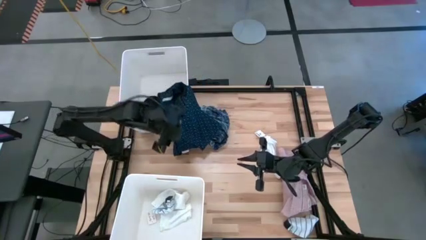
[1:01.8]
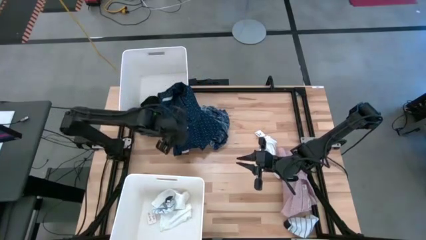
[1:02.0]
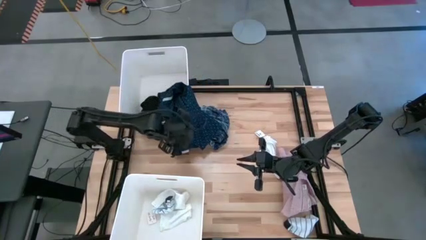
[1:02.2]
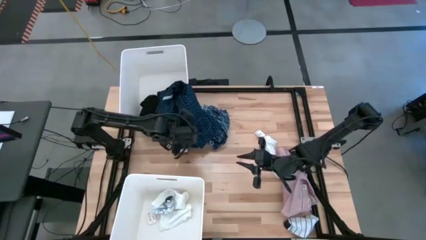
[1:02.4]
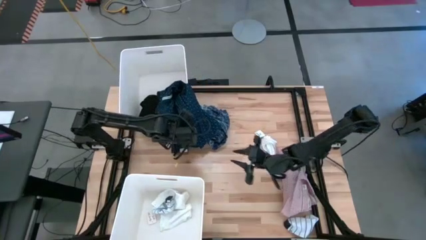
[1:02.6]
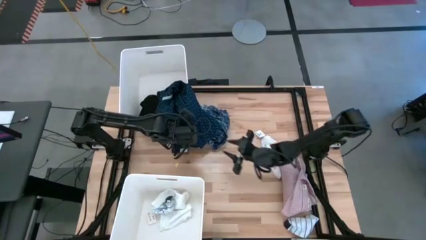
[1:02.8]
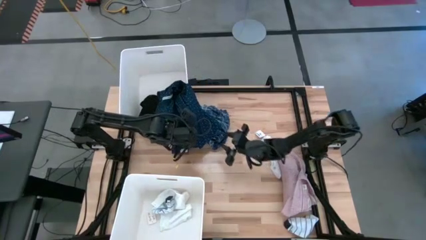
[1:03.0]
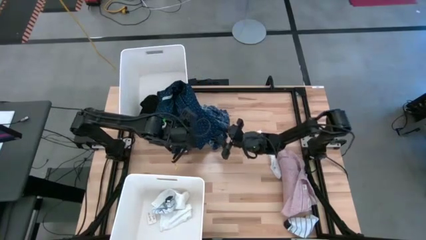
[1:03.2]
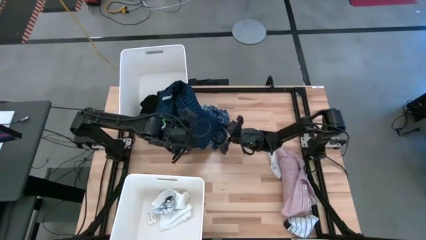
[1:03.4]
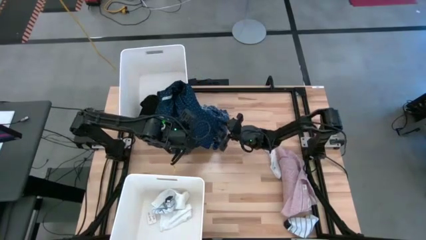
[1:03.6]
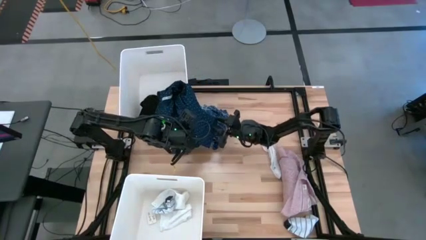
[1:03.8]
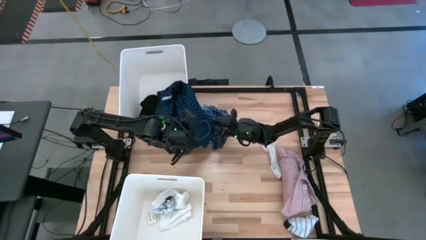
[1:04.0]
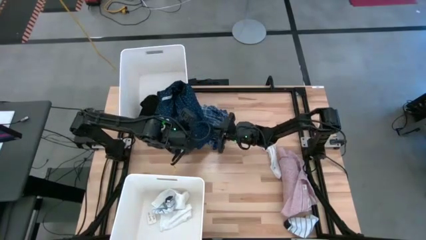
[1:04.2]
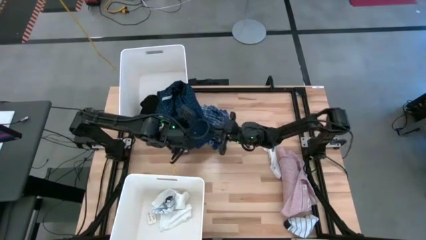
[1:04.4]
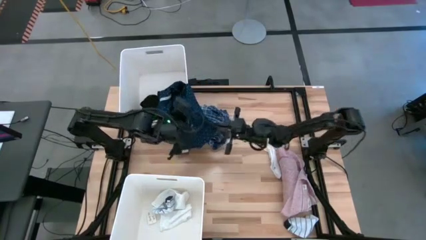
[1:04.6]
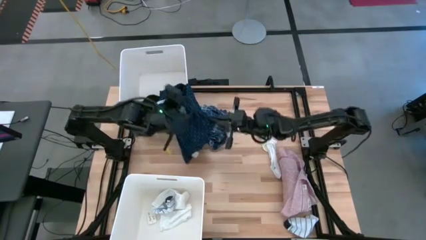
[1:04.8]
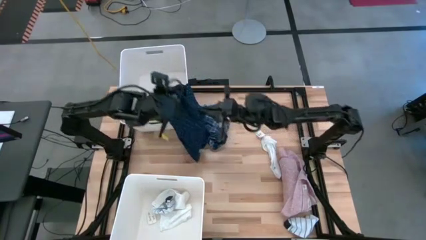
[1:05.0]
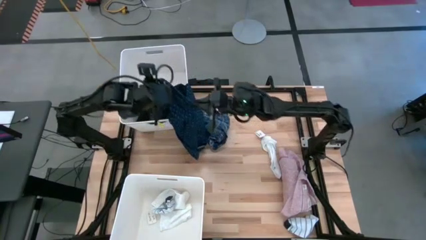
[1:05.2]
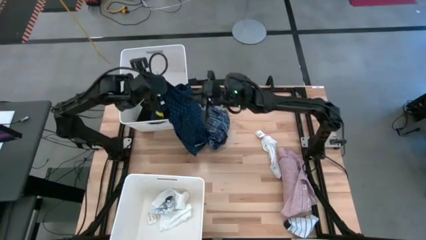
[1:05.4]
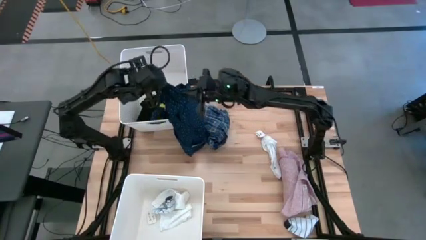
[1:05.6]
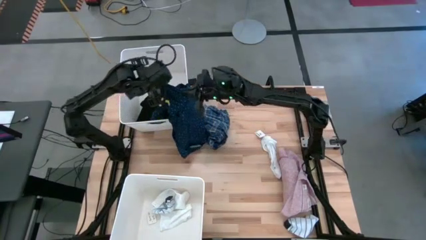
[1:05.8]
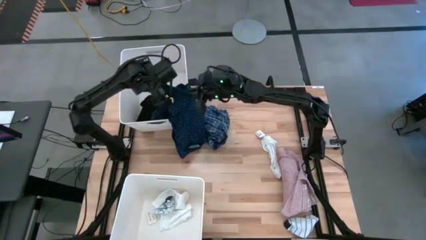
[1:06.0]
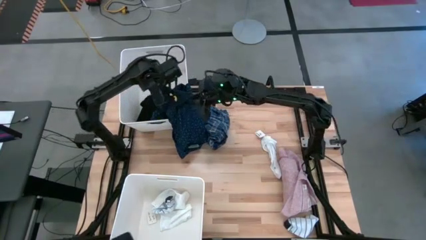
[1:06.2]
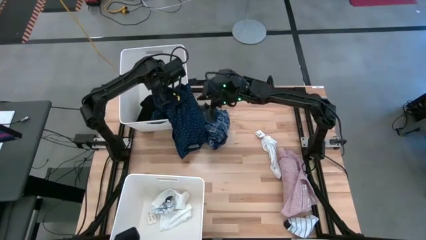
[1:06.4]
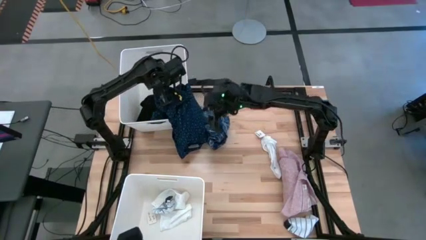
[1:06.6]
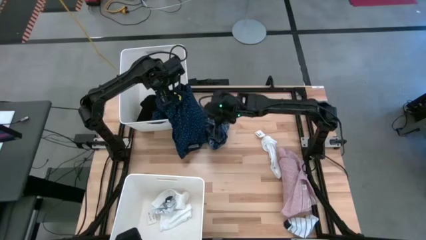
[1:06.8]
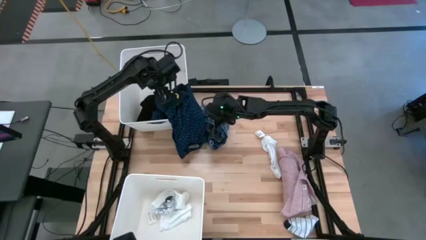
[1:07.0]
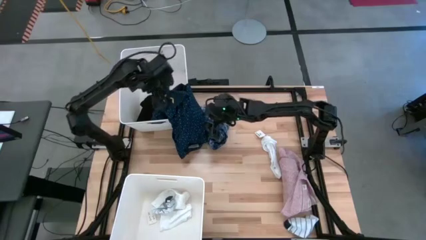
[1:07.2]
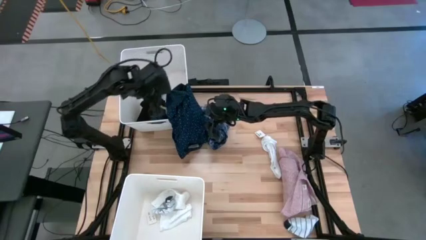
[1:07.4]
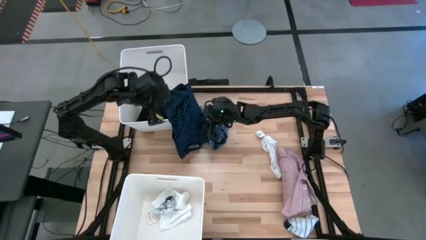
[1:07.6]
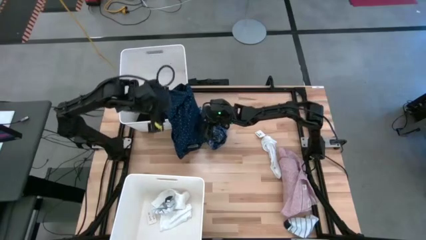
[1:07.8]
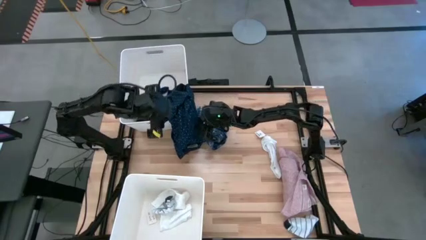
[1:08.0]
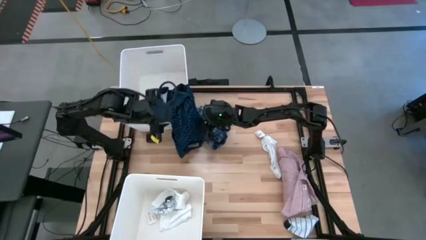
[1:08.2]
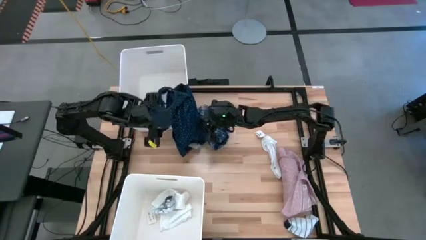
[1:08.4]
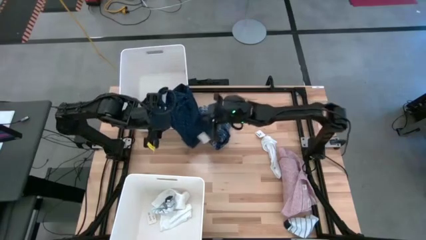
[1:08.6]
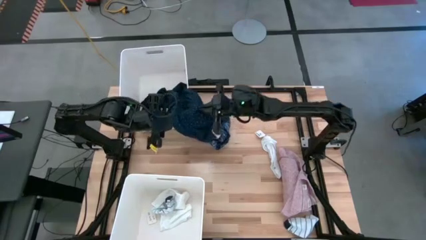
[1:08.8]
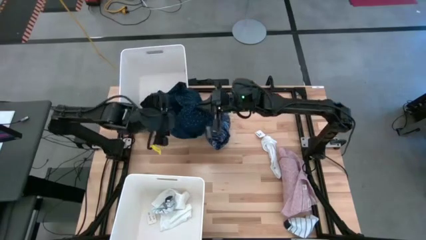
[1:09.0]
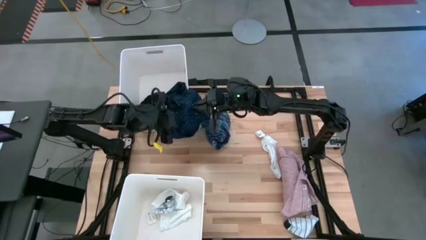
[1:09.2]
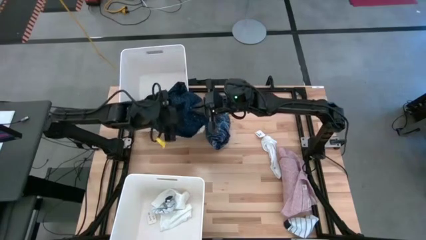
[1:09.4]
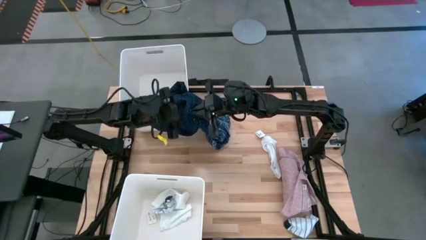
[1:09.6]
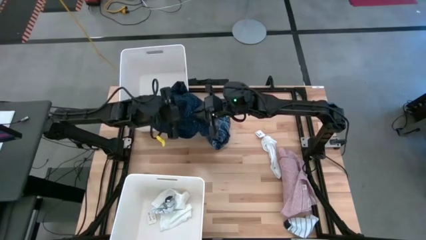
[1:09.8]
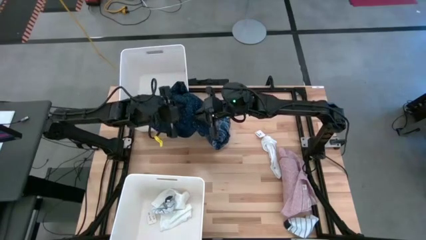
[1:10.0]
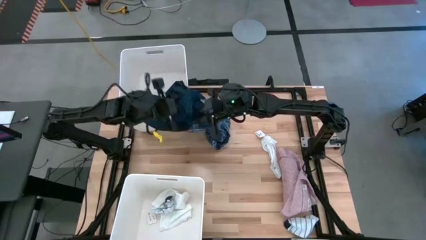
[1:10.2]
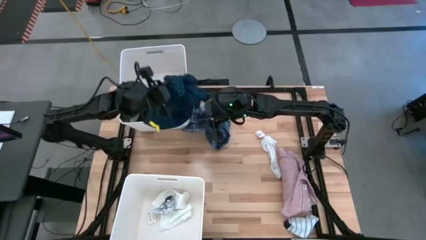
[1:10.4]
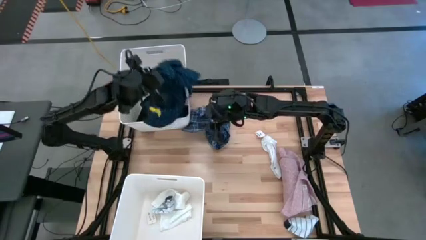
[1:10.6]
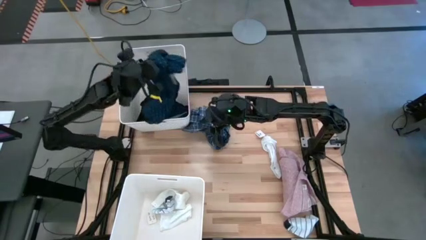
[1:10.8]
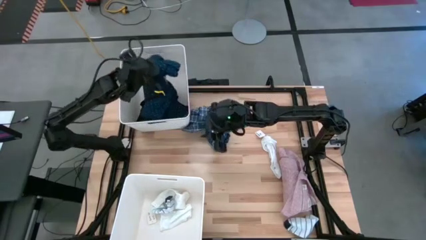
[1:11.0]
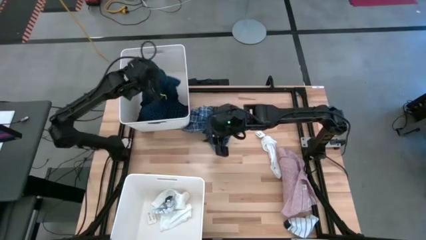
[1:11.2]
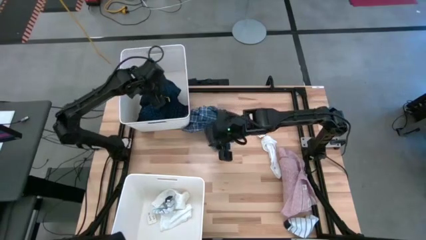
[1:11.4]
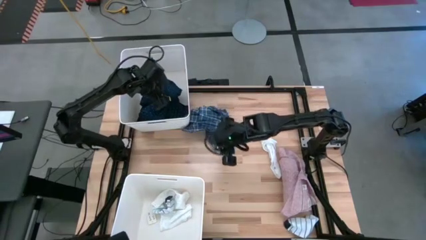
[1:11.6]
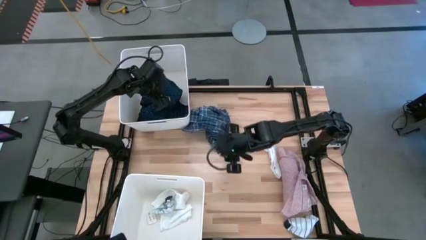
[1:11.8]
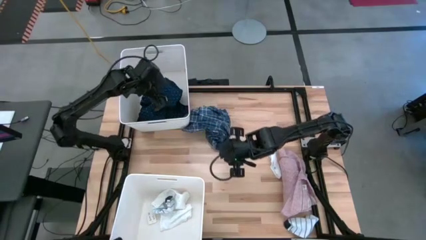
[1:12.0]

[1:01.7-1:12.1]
Task: Sort clothes
Put the blue shirt into the top white bin

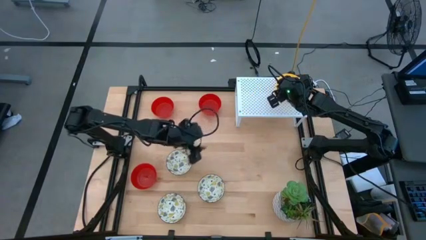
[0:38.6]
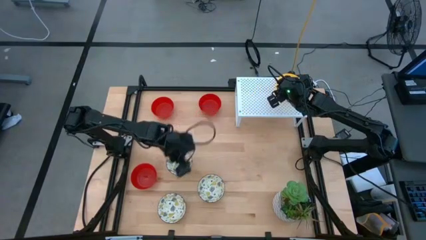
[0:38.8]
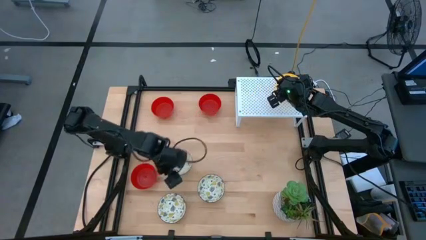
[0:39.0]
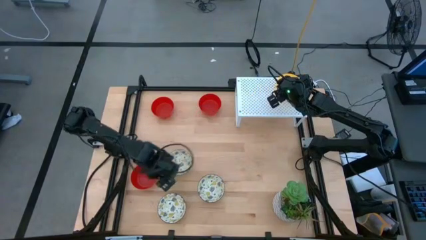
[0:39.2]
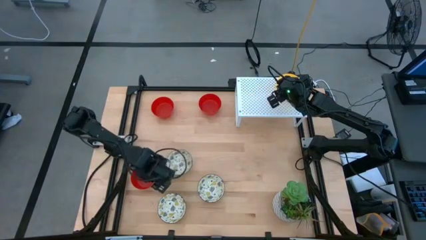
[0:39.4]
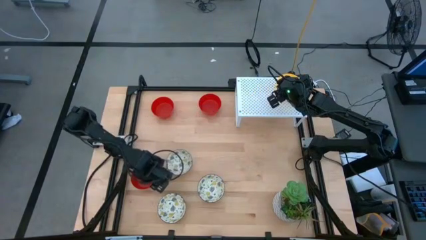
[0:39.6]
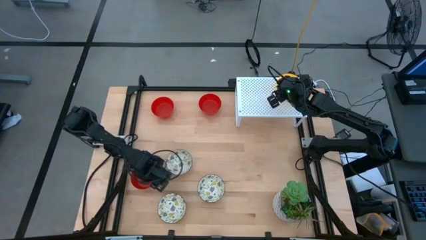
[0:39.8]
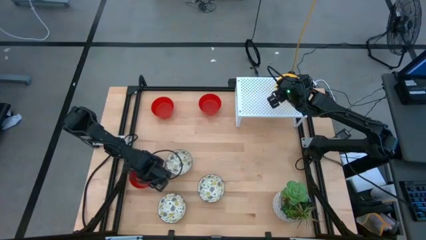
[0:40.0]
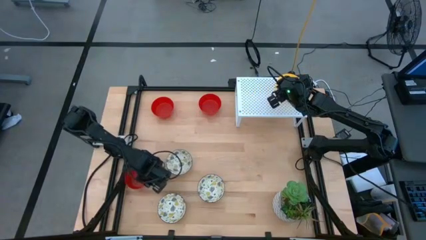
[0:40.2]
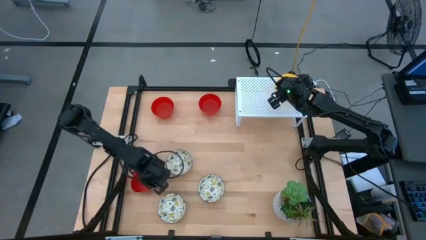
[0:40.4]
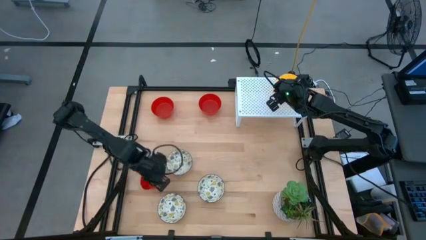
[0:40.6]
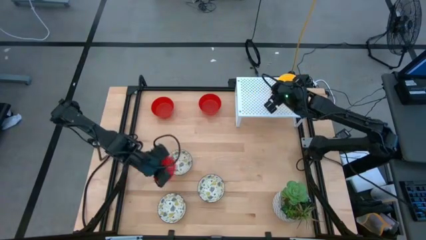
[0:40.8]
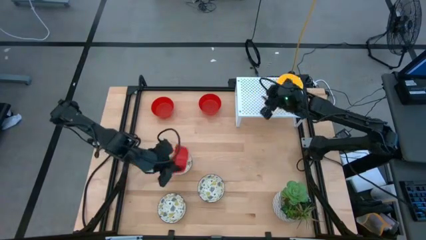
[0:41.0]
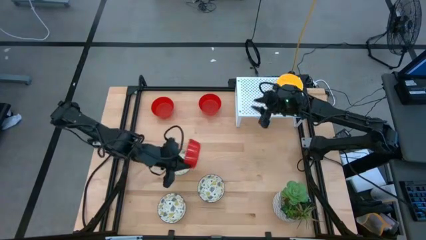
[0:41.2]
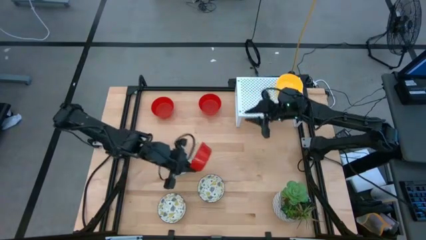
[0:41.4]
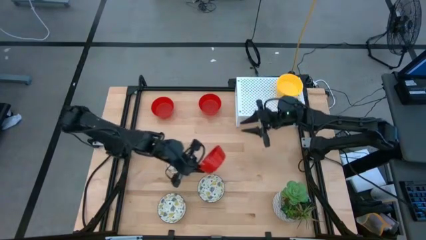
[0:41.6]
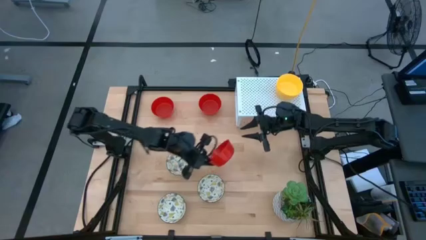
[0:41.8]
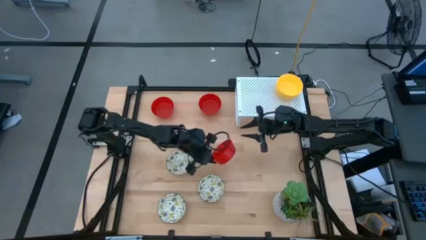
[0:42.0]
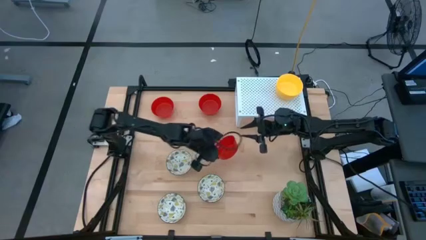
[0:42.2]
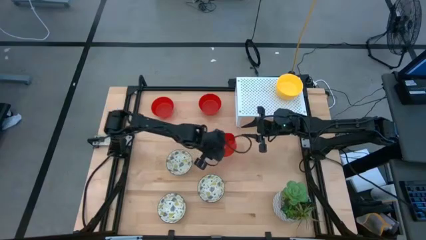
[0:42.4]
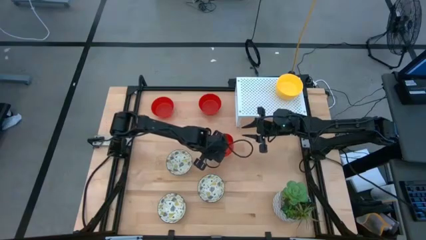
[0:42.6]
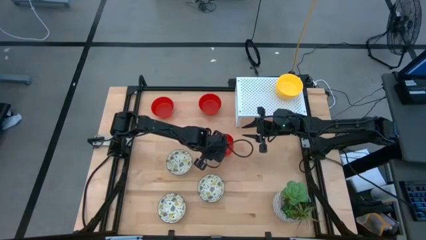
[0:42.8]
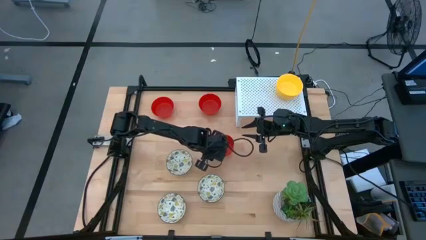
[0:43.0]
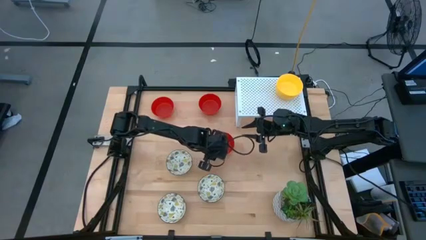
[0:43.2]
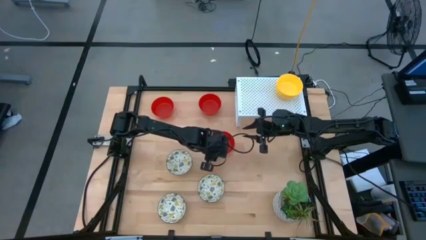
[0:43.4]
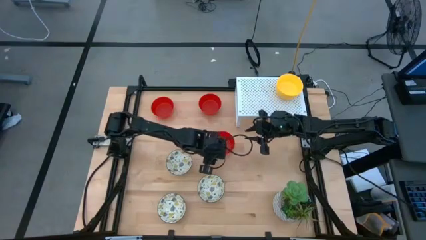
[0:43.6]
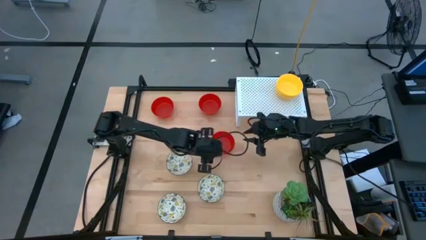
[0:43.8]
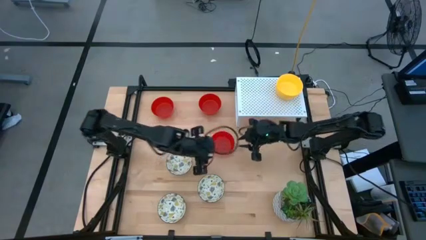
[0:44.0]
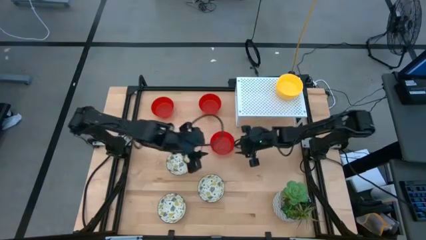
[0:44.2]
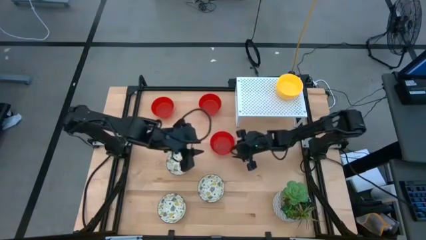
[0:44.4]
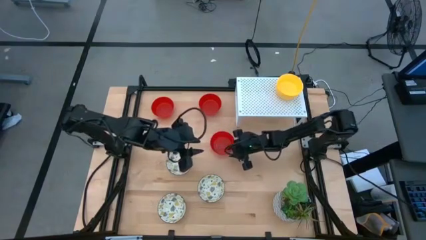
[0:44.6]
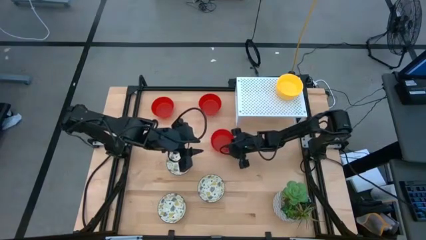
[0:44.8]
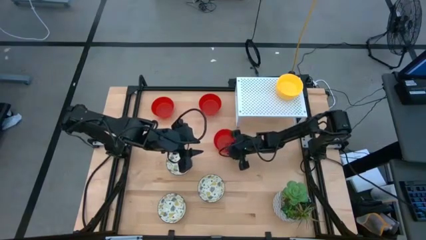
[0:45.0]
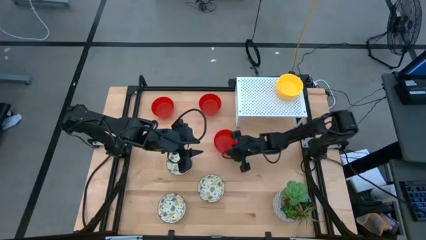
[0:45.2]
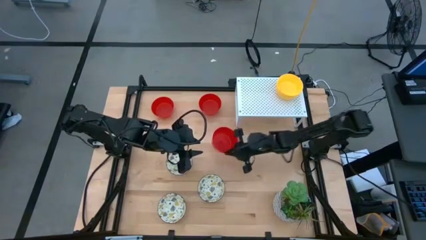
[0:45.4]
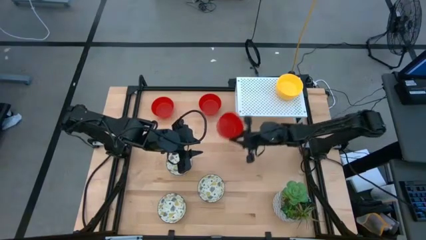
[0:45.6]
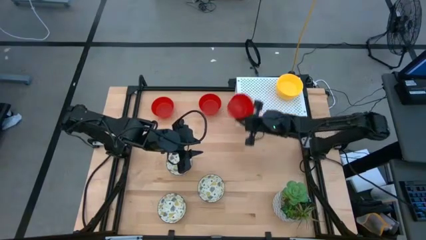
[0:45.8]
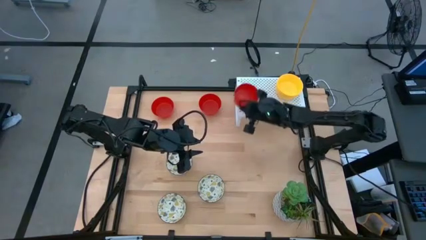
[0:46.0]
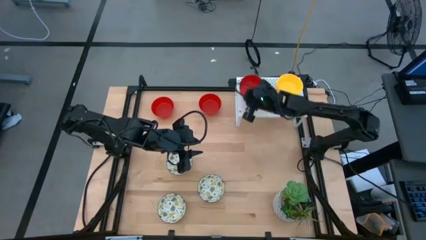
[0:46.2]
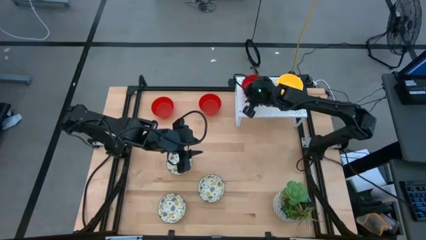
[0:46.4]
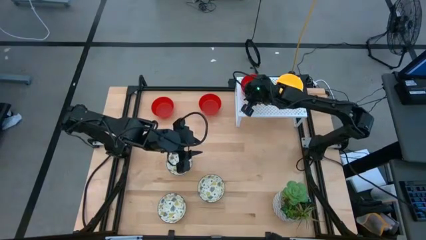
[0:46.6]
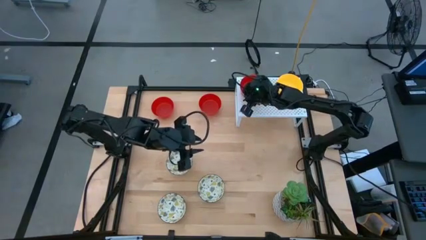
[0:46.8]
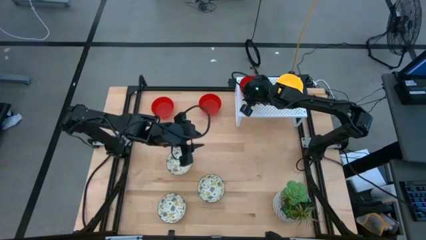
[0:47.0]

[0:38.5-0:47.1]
Task: Pick & Place Mini bowls
Put the red bowl on the shelf
